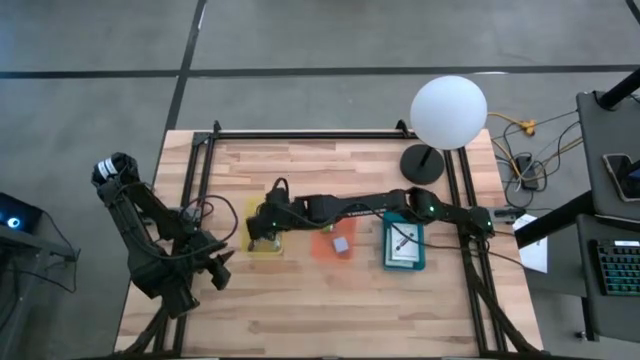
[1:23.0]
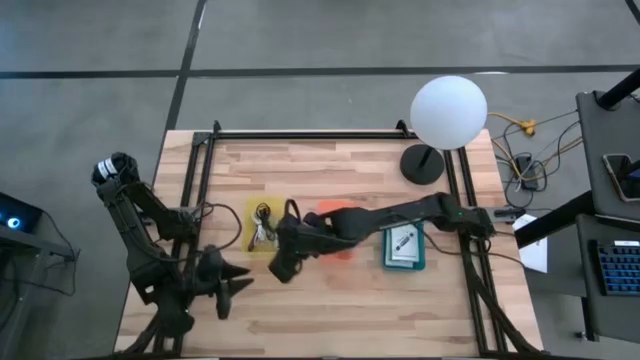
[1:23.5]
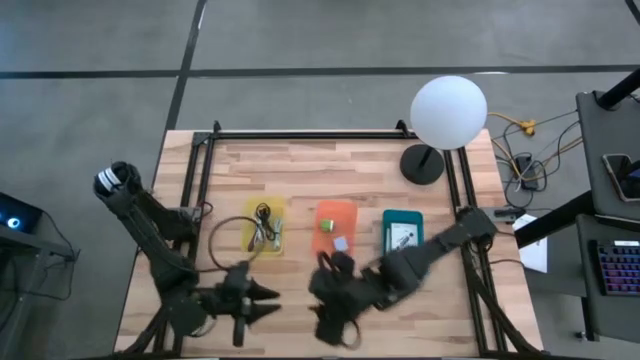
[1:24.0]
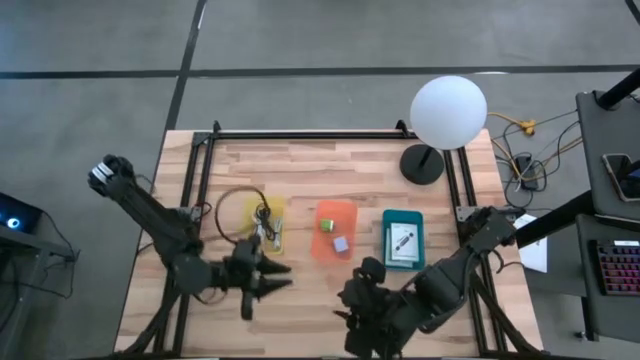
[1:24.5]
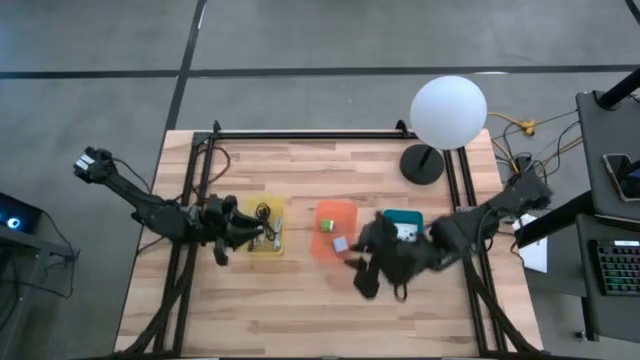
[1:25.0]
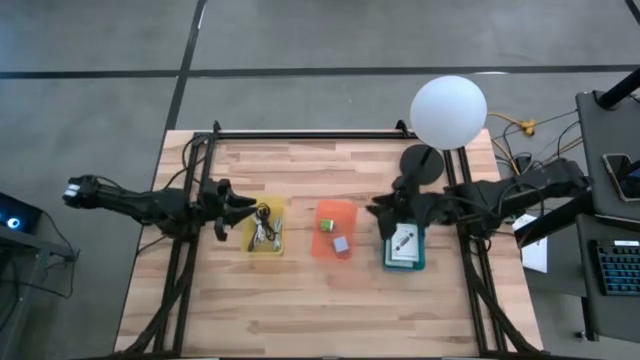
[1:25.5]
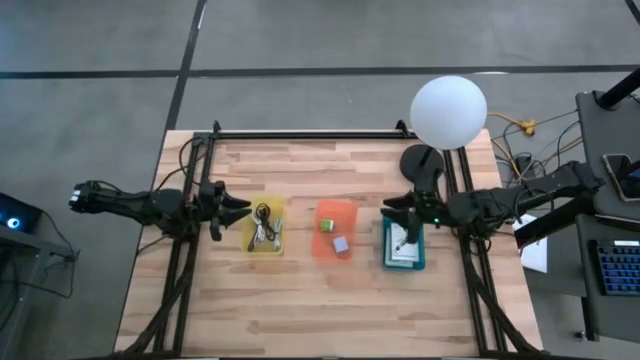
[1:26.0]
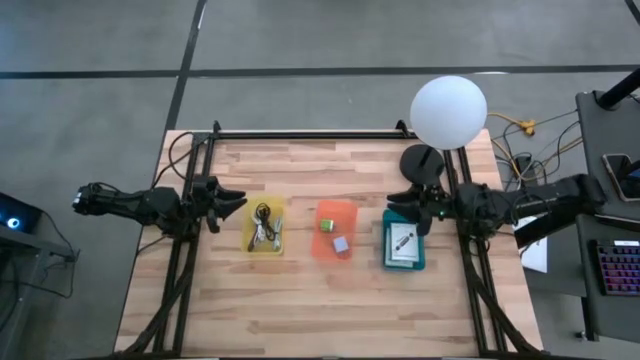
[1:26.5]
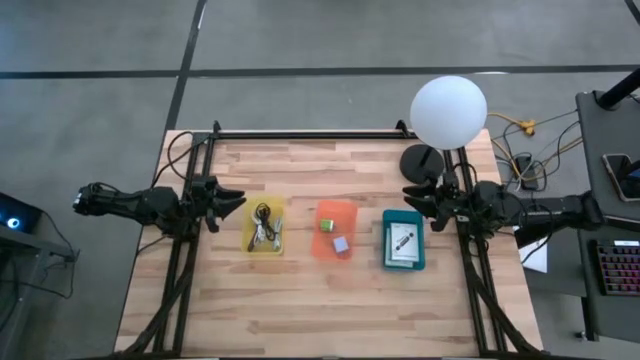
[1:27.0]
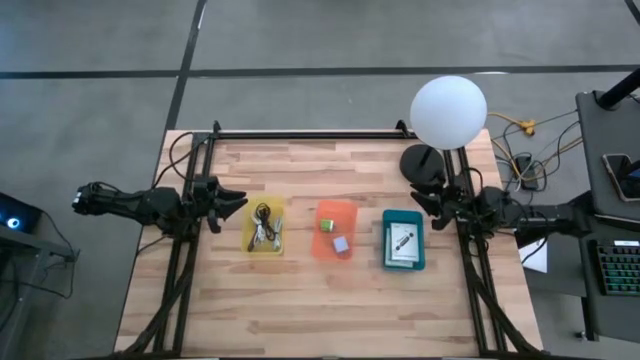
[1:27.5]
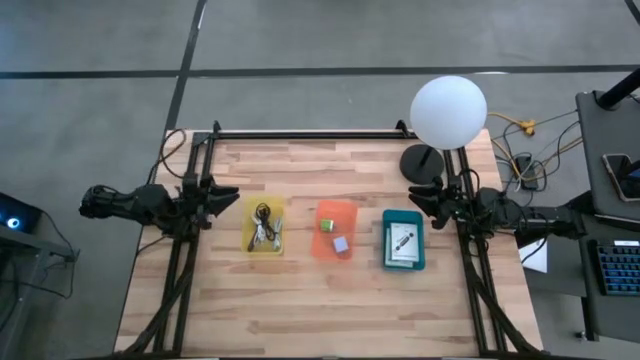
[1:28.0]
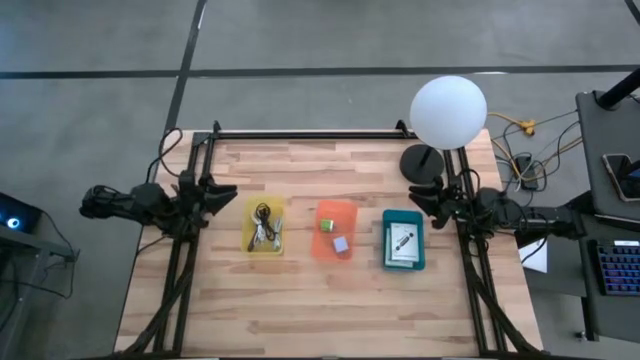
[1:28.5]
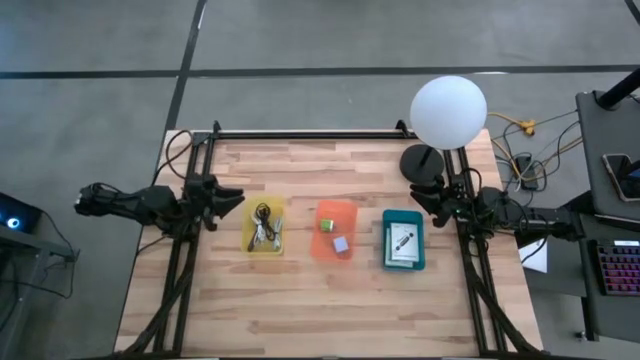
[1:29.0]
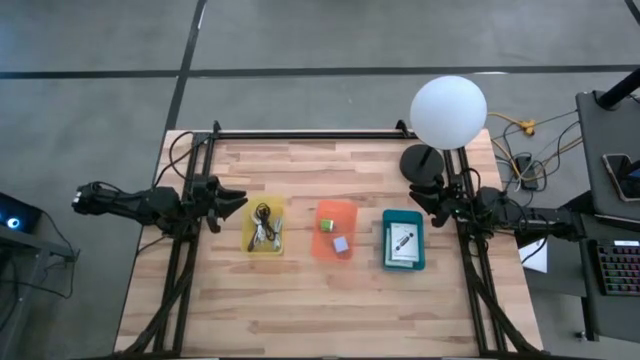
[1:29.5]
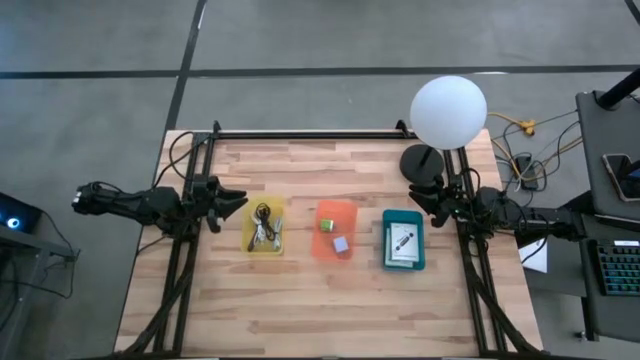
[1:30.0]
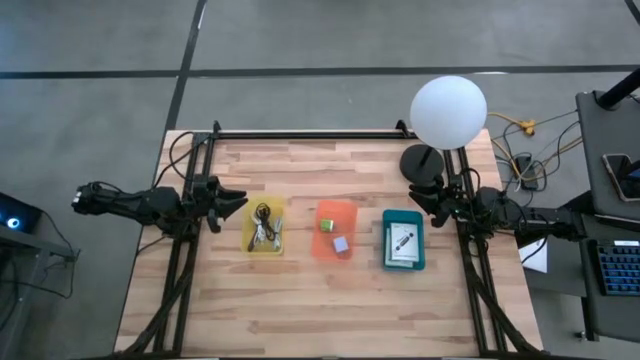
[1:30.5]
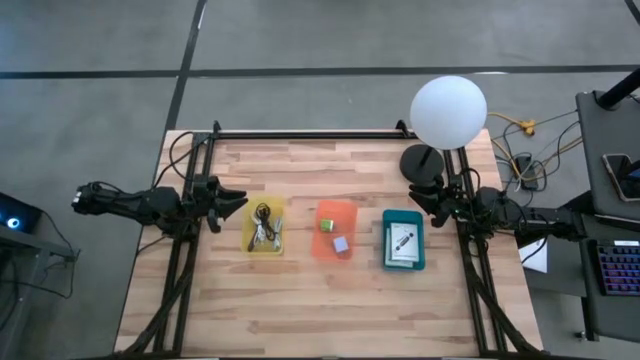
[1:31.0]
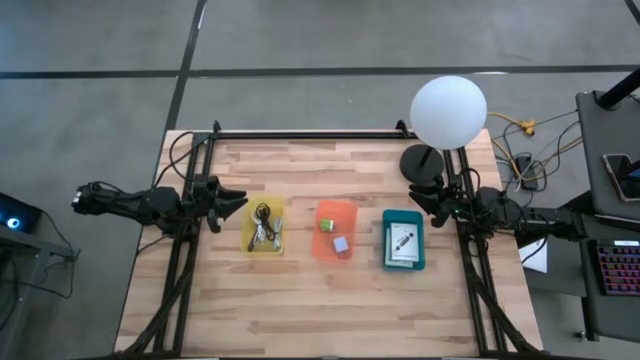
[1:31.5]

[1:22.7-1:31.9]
Task: Pick and place items into bin
Return to Home Position

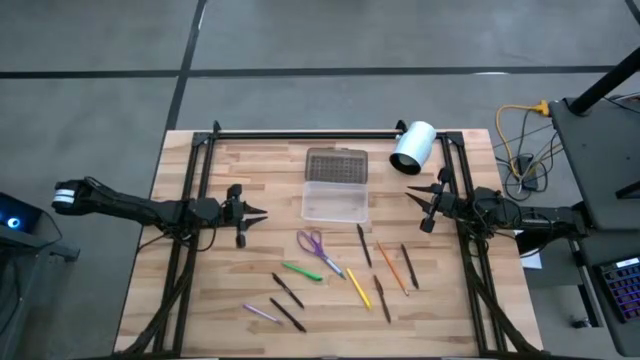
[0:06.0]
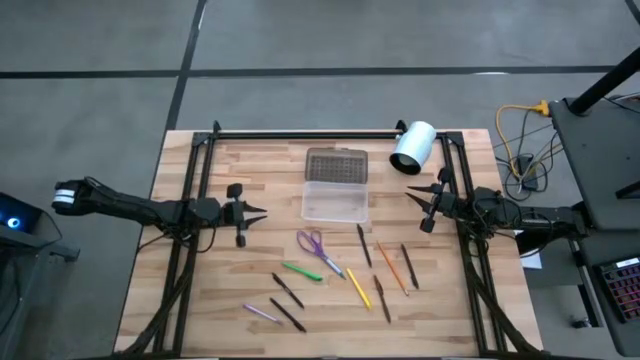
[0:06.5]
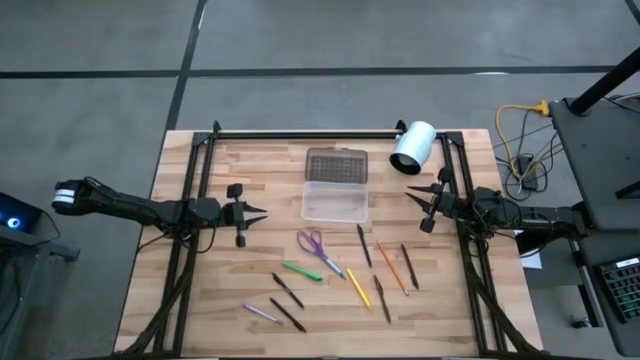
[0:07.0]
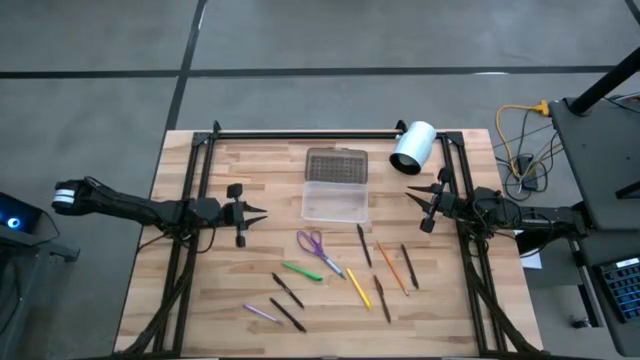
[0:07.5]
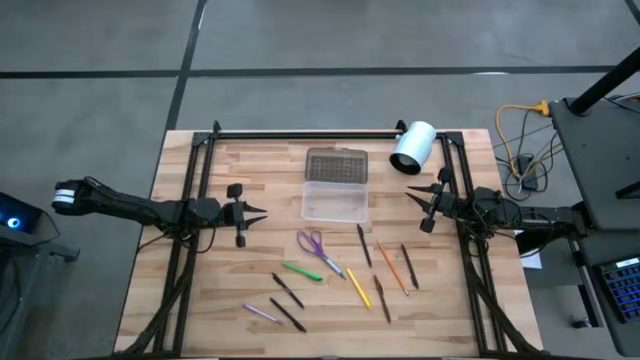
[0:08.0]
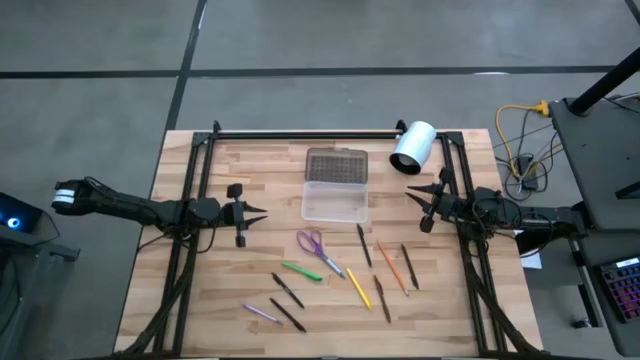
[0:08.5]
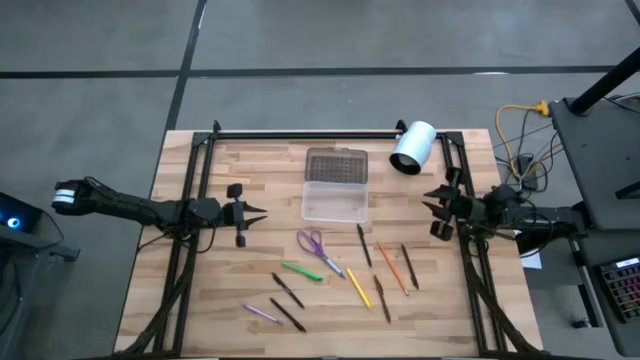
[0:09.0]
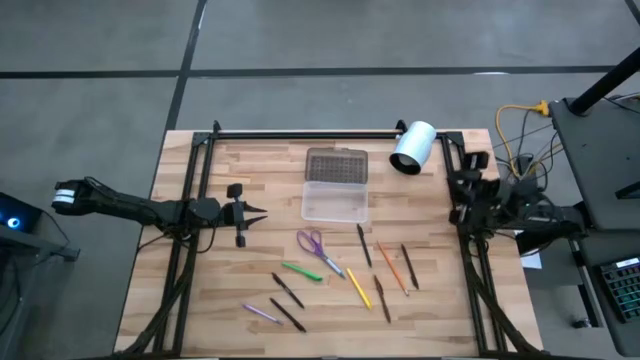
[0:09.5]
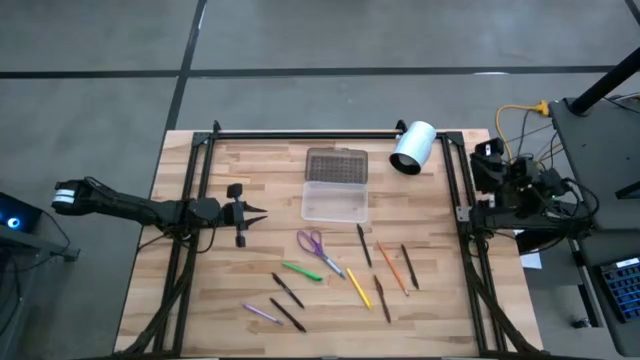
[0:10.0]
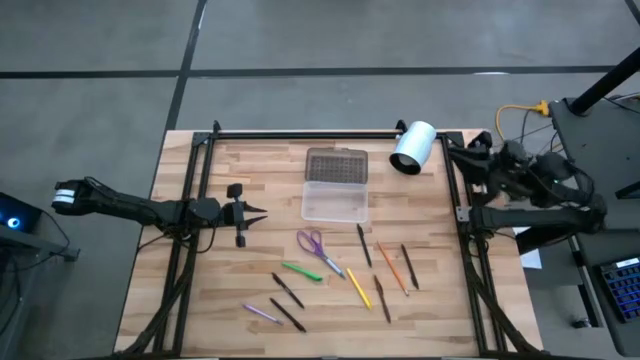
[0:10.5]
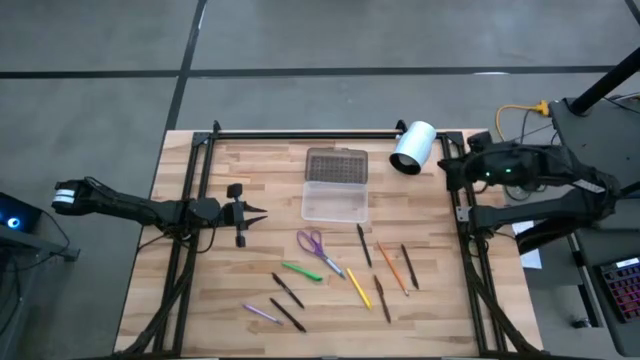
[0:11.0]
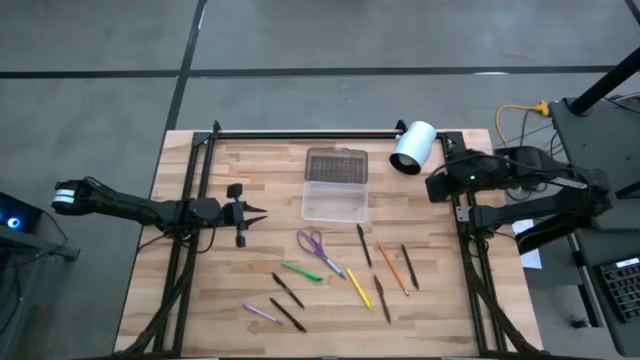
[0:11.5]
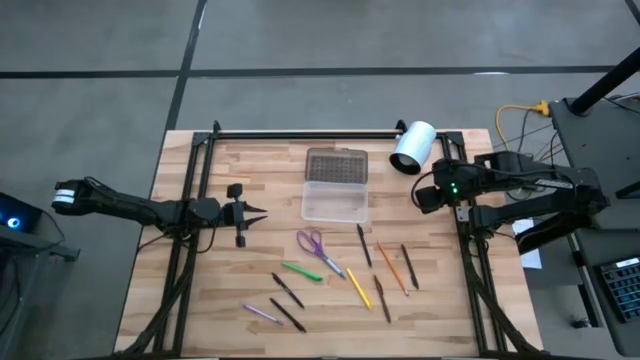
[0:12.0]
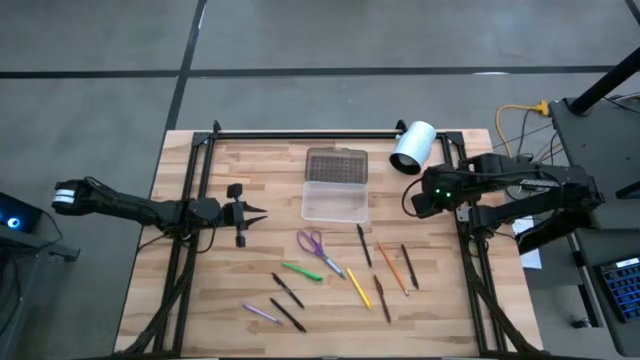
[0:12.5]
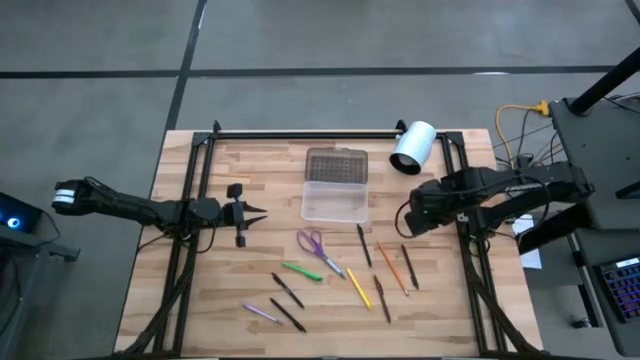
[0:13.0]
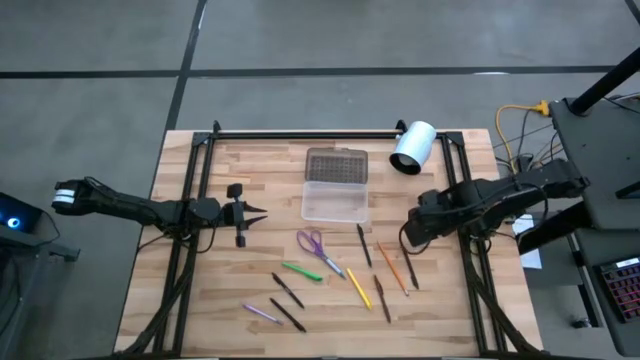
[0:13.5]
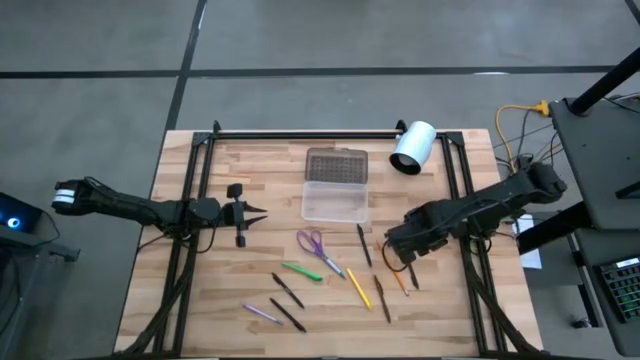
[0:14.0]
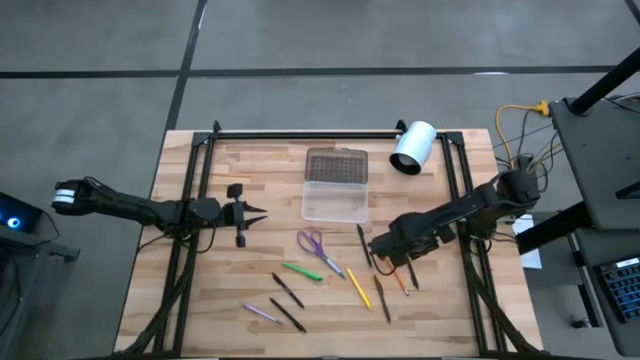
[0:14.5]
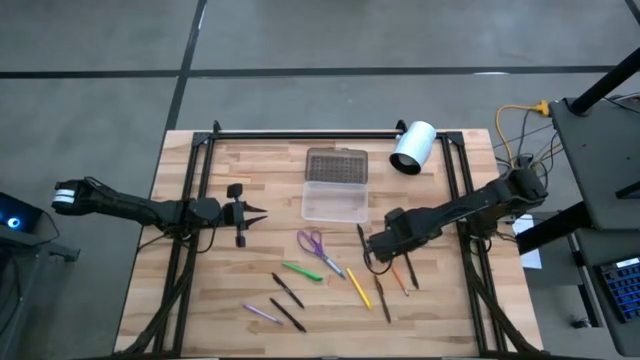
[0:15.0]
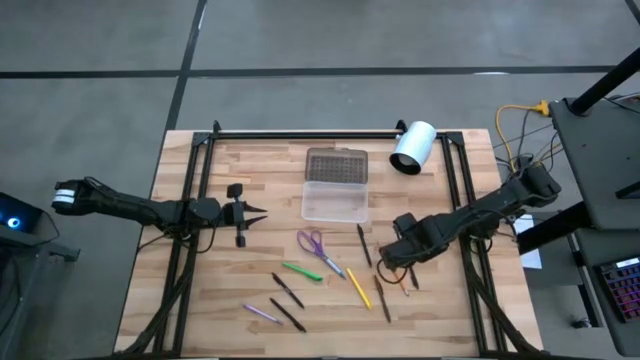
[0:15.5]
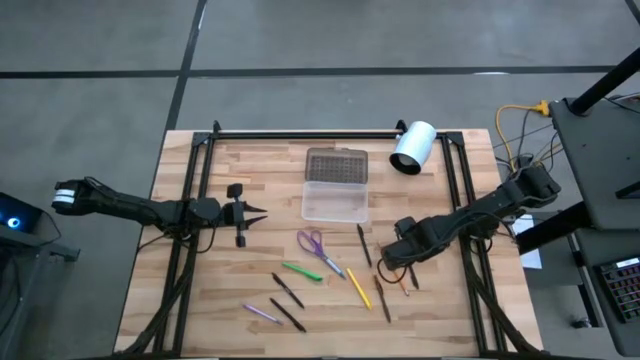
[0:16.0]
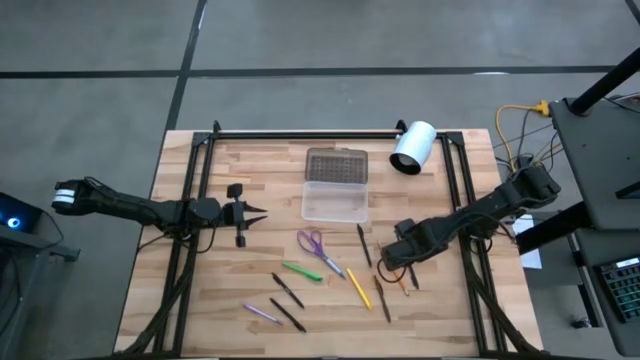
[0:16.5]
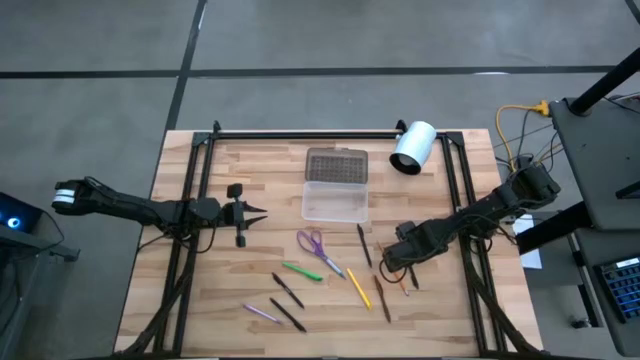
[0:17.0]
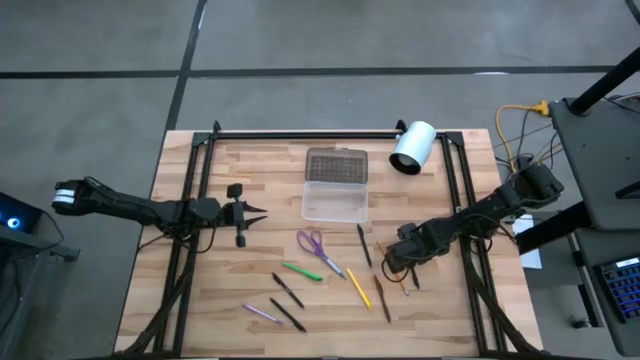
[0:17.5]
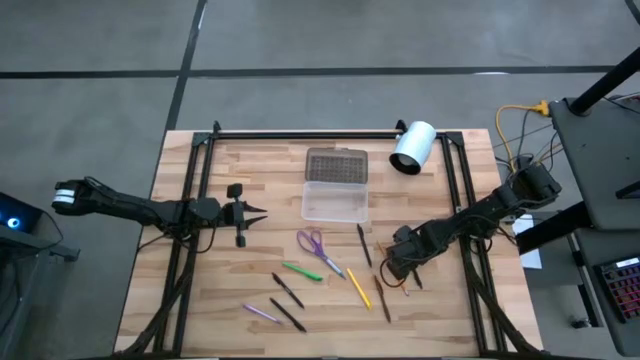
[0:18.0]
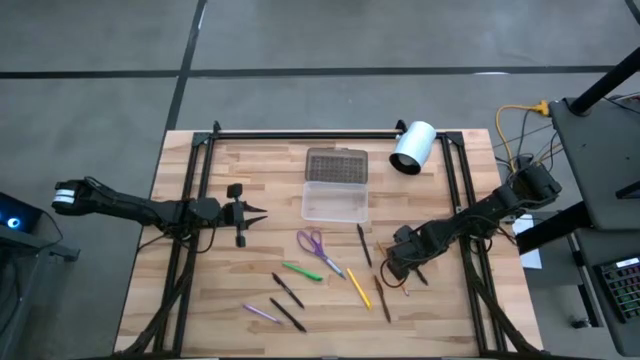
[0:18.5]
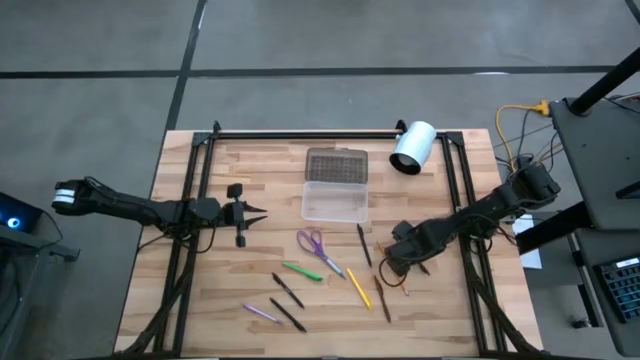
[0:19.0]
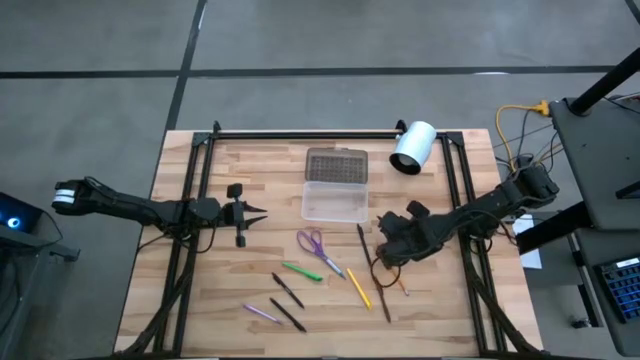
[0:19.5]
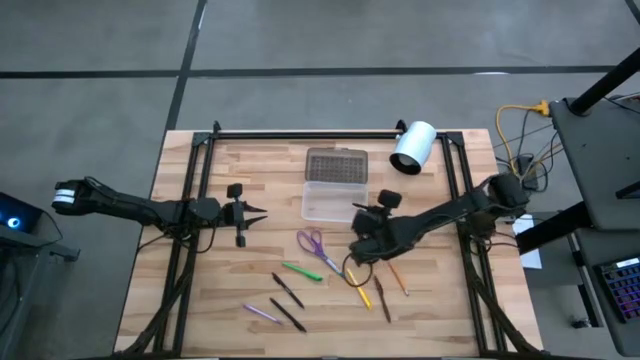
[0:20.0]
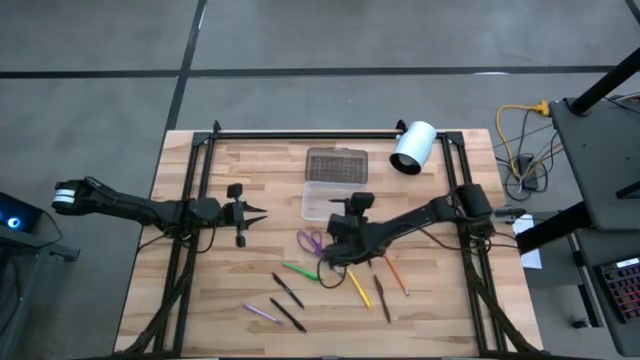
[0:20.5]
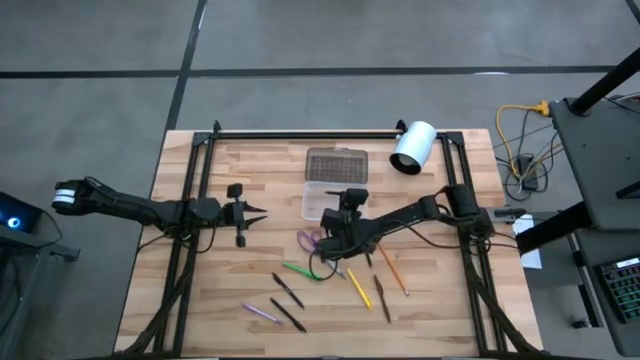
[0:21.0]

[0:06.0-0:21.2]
Task: Pick & place school supplies into a supply box
Put the middle right black pen into the transparent bin
